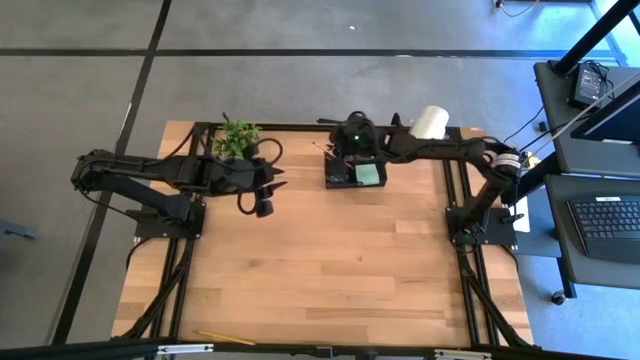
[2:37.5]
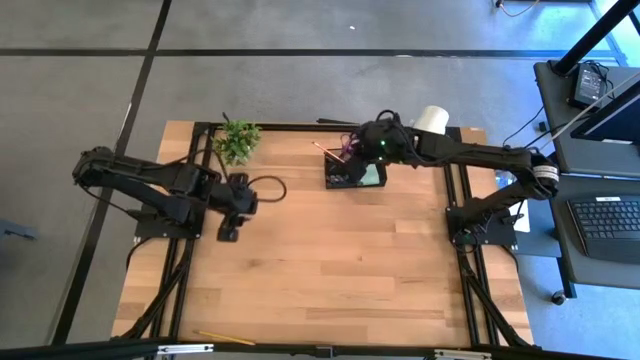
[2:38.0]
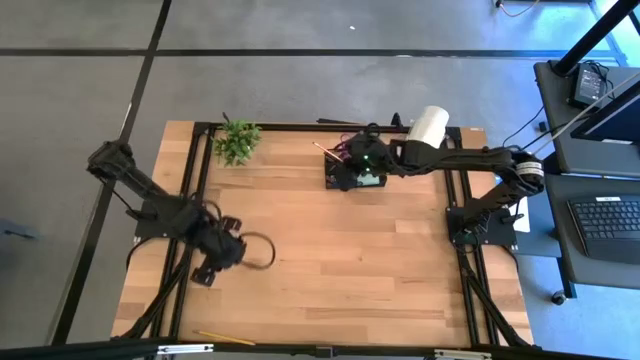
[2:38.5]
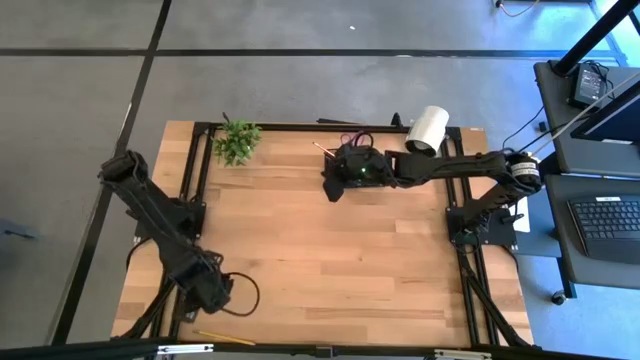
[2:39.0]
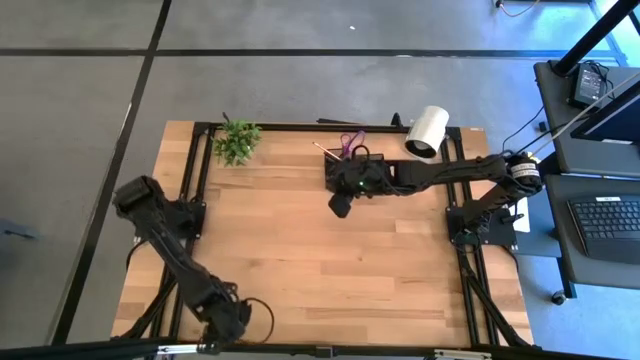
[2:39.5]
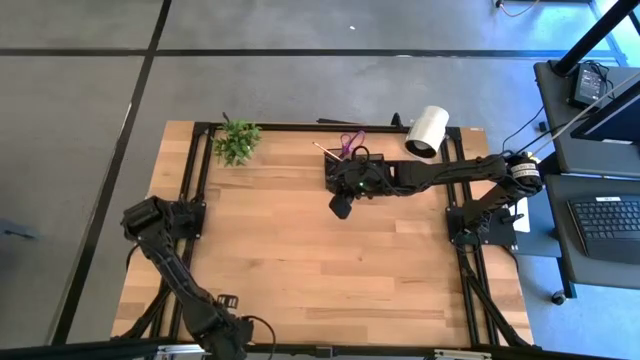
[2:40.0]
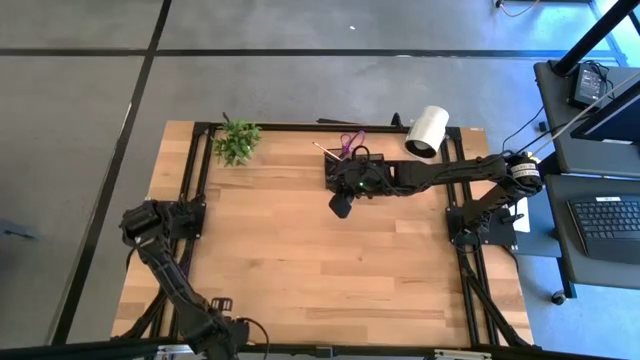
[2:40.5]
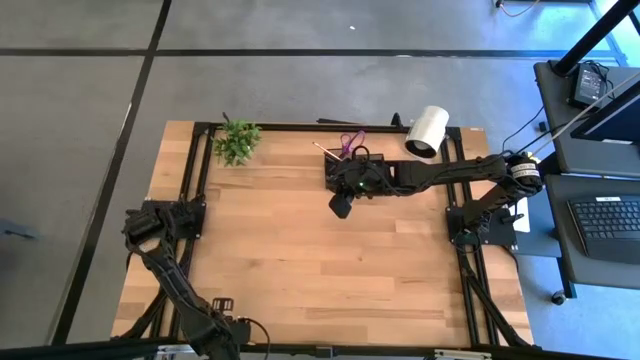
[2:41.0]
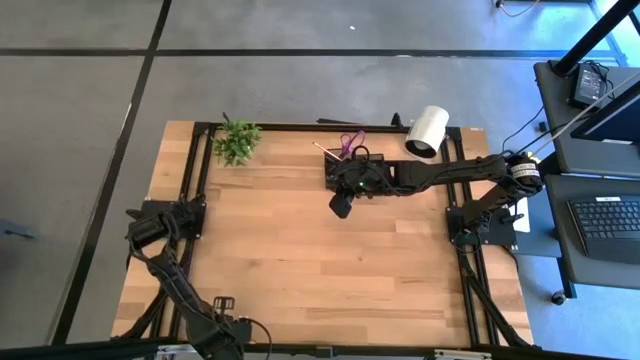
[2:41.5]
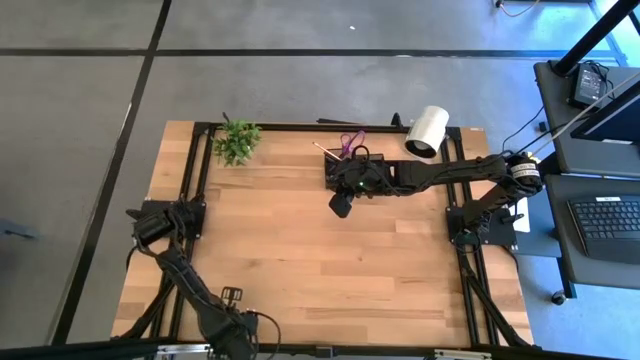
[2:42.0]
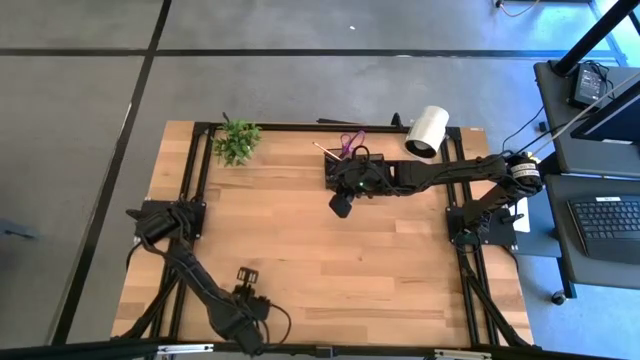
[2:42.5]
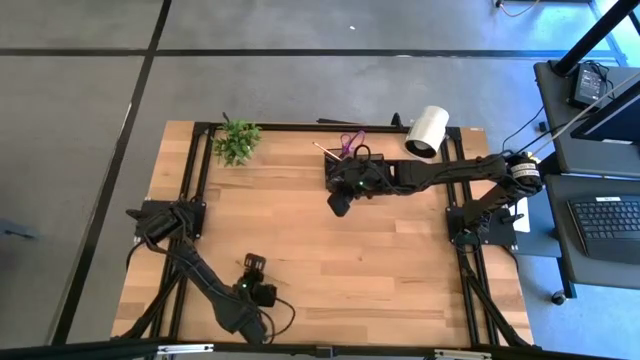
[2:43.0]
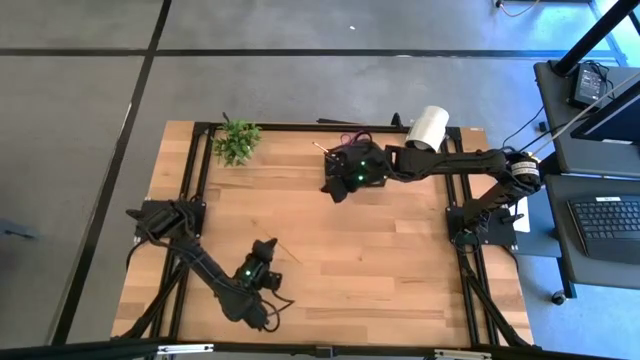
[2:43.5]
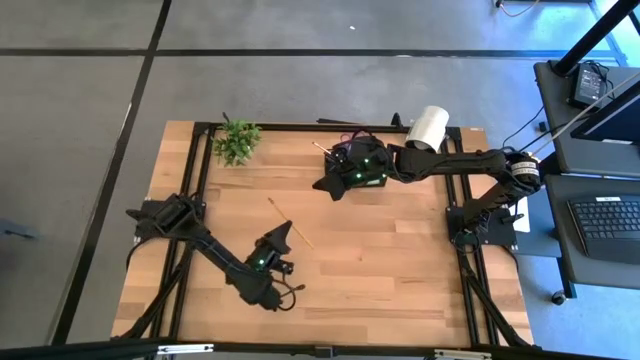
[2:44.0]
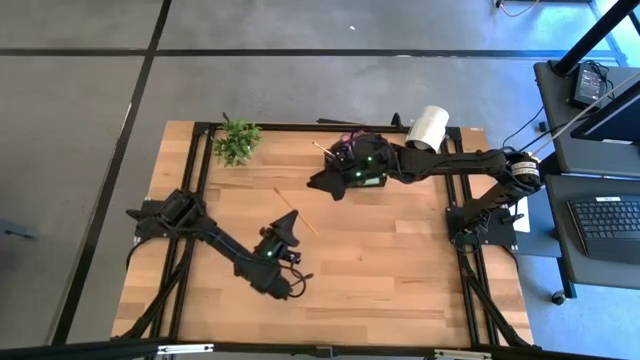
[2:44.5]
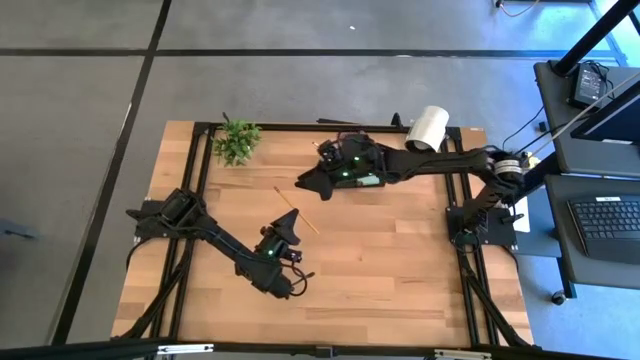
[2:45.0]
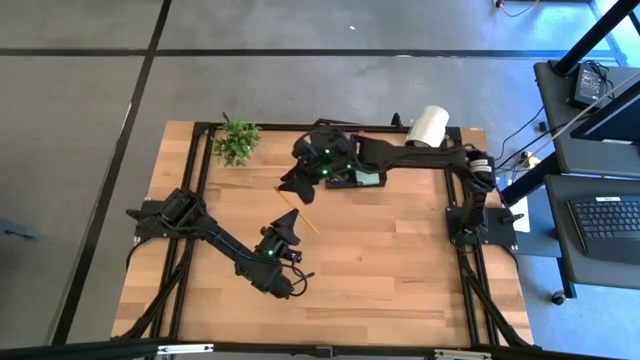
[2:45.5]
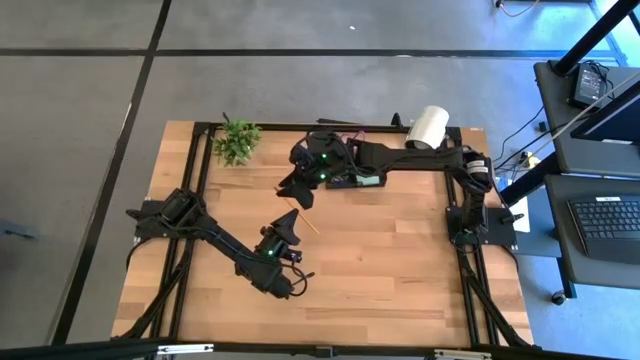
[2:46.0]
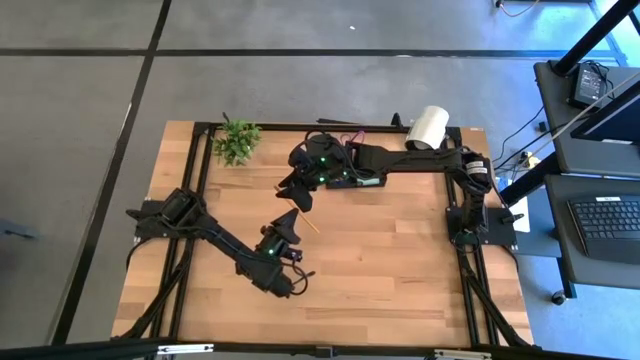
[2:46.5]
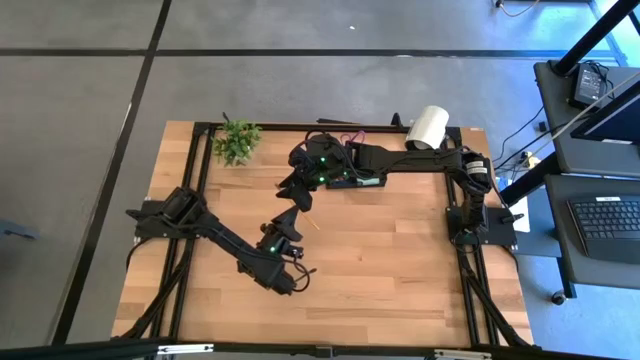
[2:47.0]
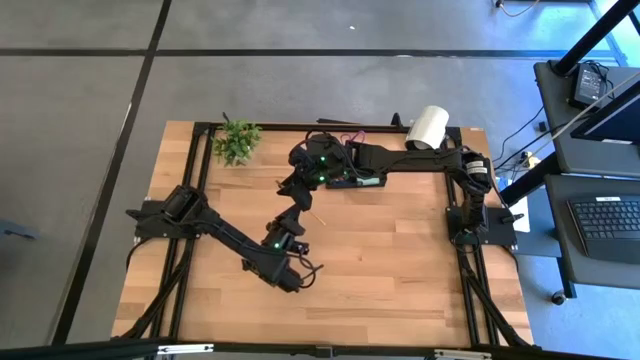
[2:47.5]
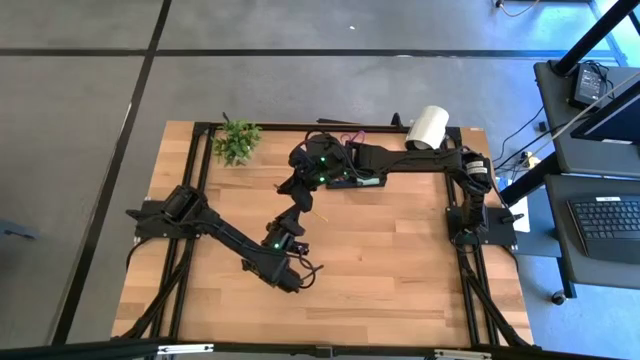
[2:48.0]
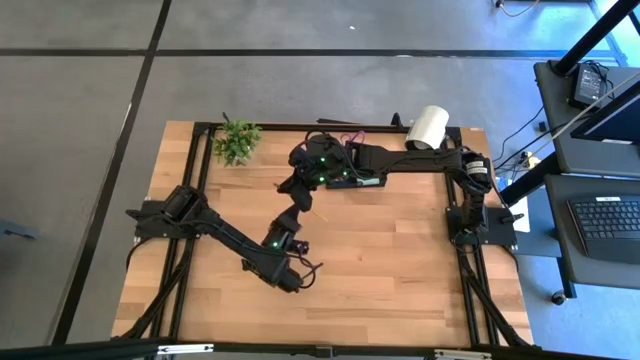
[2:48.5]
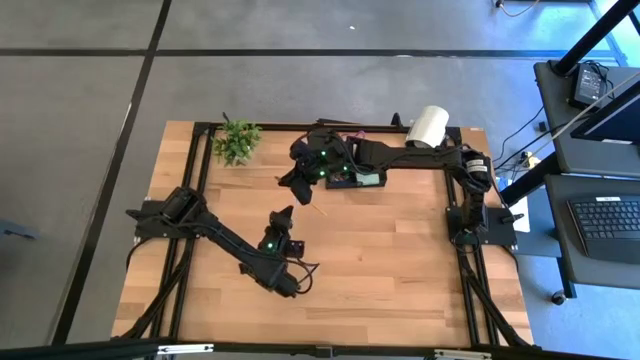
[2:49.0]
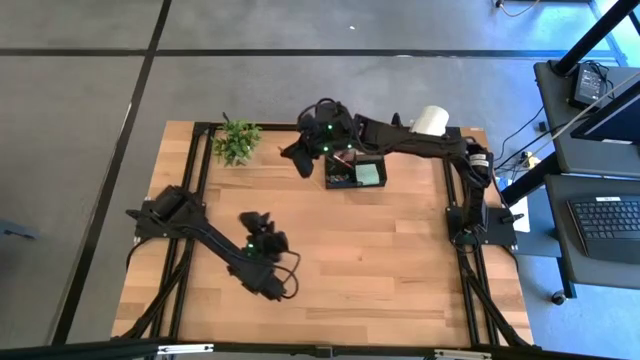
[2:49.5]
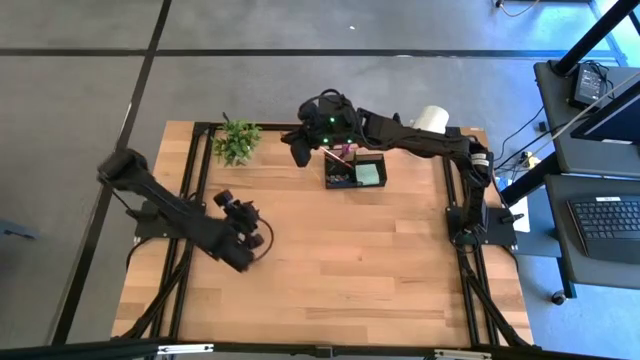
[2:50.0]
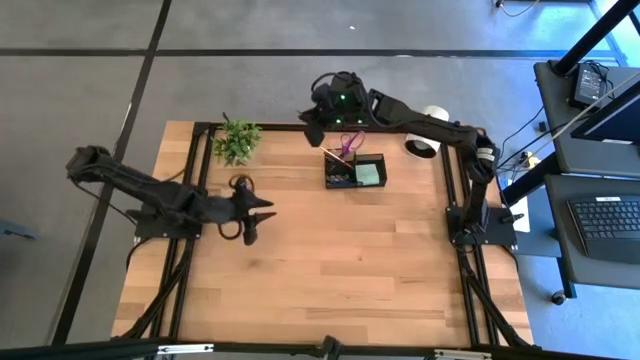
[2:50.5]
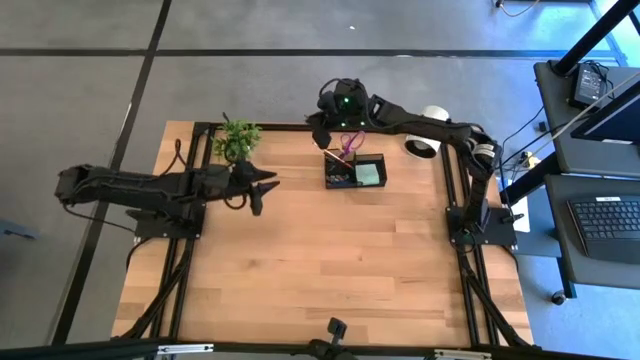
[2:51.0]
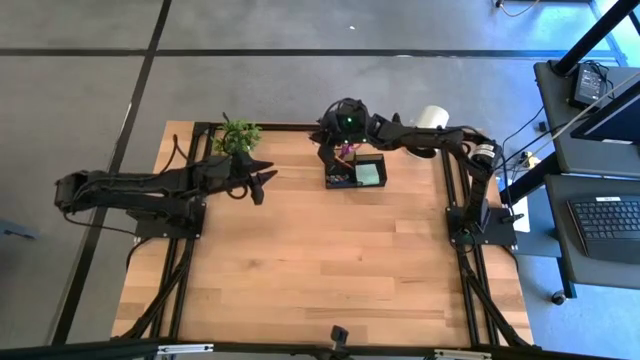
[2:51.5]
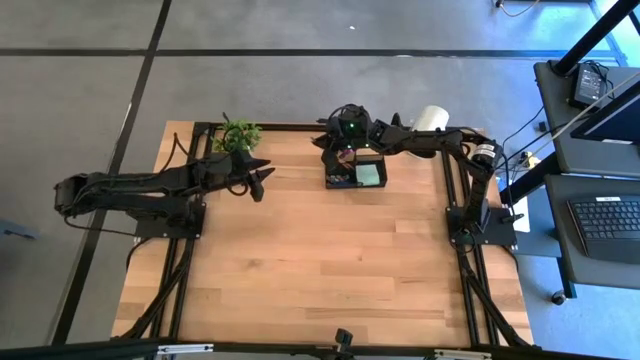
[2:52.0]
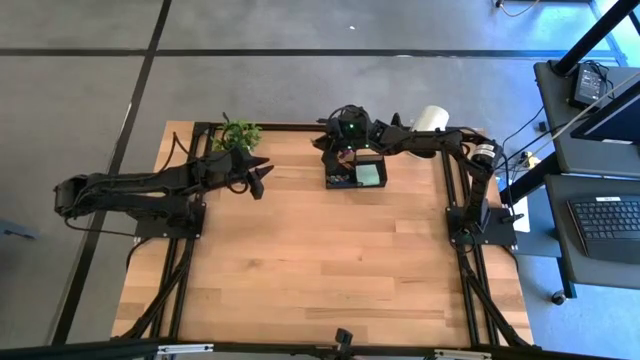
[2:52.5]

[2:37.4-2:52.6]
Task: Pick and place office supplies into organizer
Put the yellow pencil into the black desk organizer

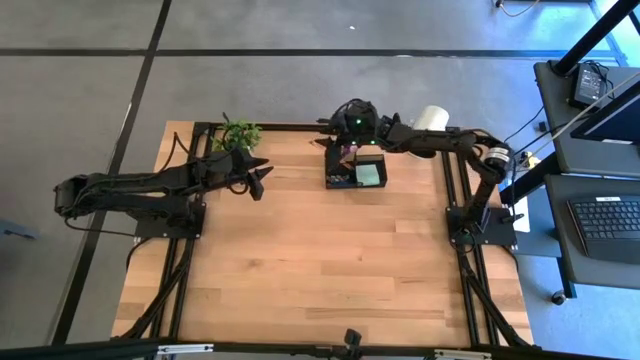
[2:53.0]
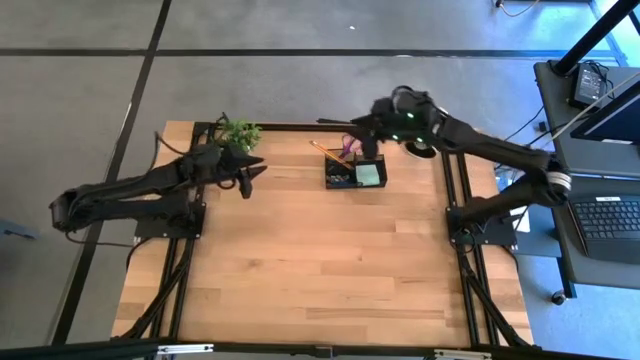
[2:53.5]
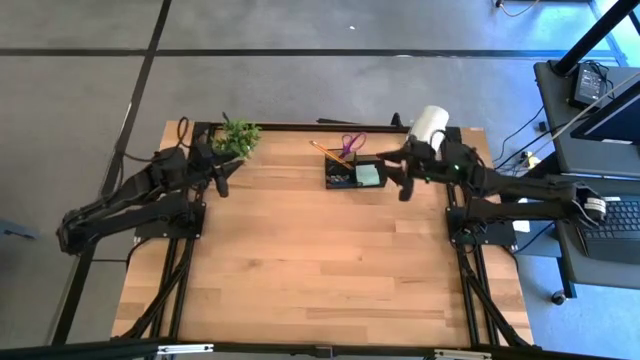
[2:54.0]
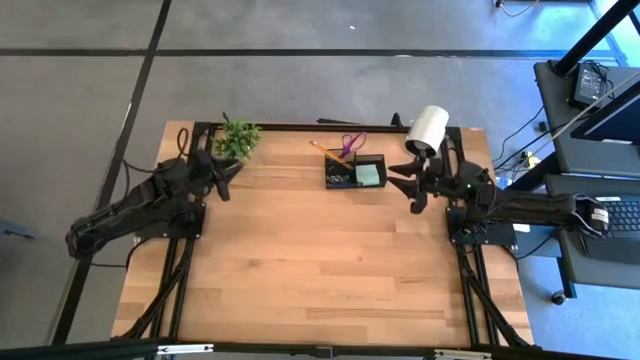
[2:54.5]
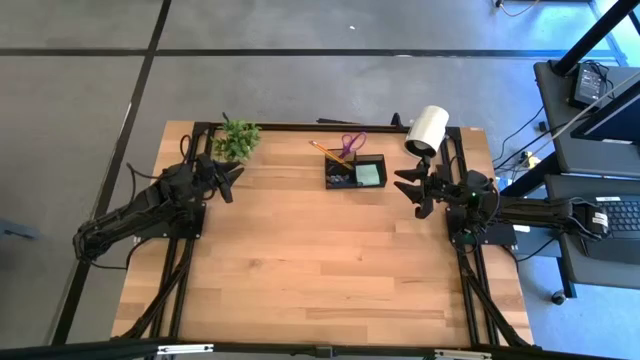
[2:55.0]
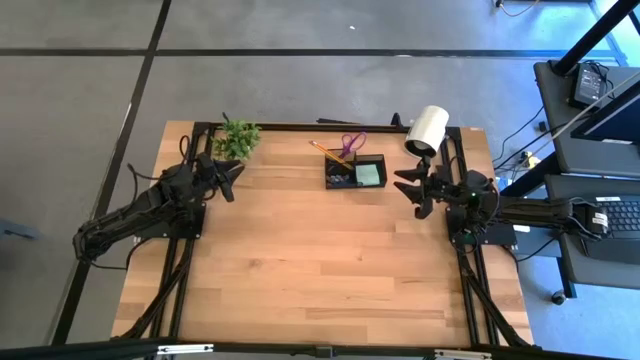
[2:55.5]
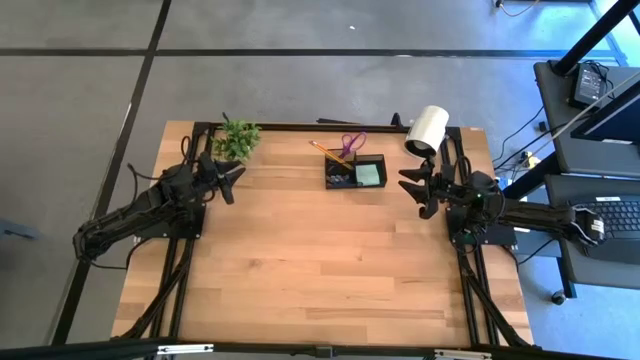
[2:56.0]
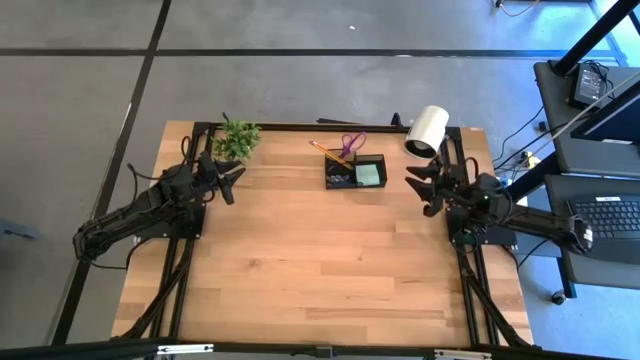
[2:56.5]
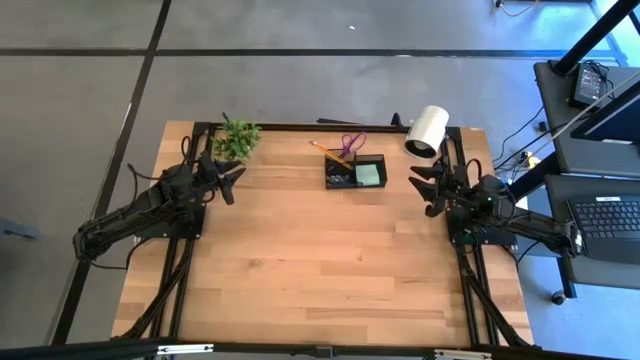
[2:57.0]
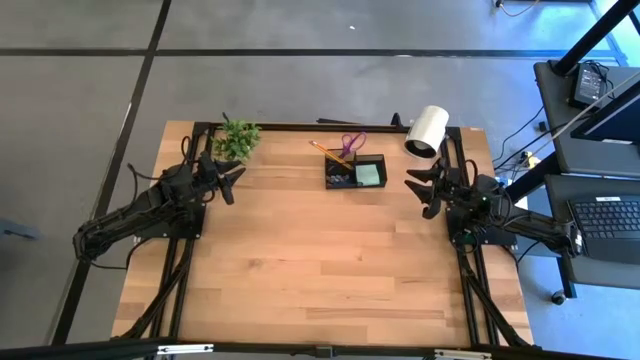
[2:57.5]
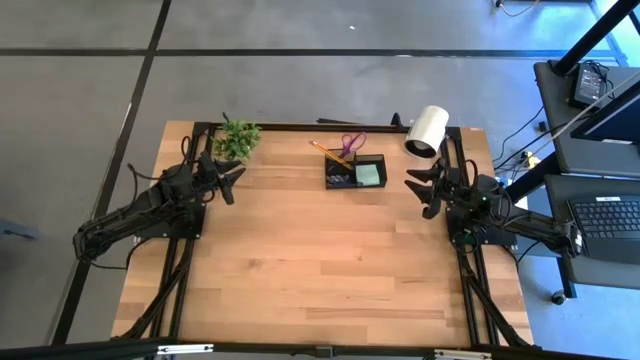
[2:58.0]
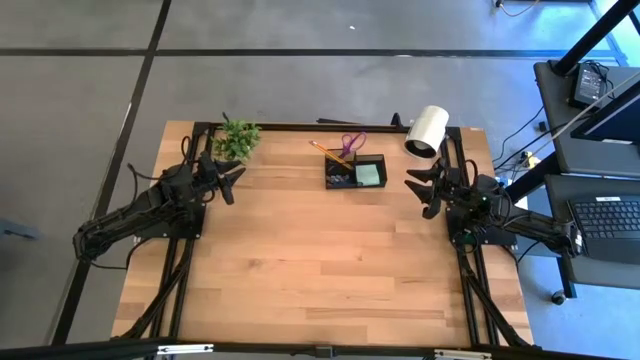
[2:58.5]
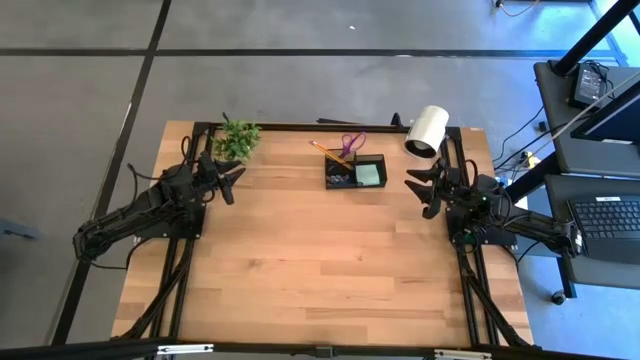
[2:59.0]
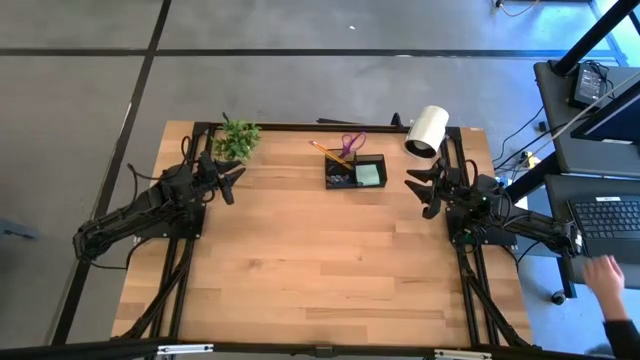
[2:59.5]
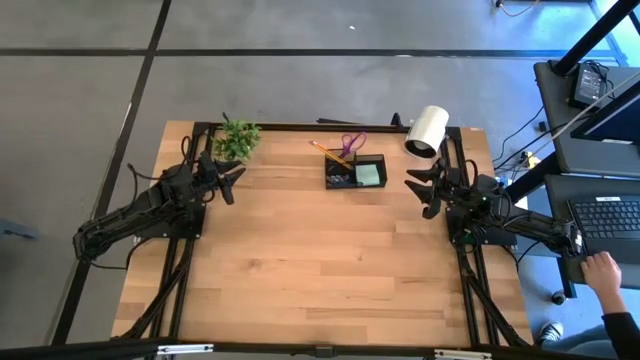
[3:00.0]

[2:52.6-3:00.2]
Return to Home Position
